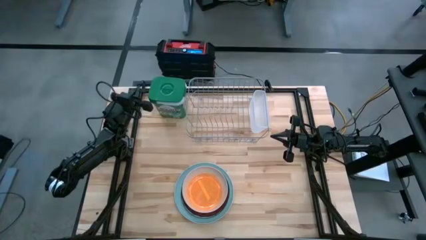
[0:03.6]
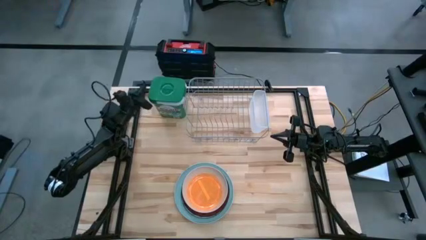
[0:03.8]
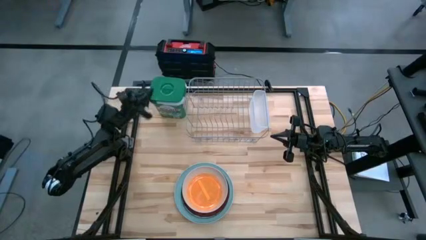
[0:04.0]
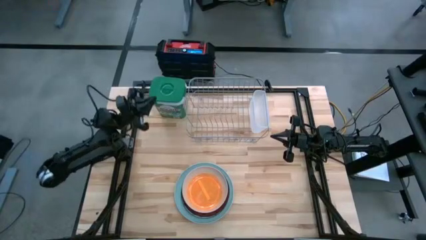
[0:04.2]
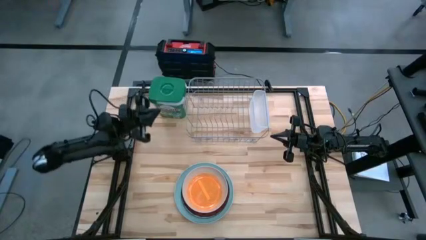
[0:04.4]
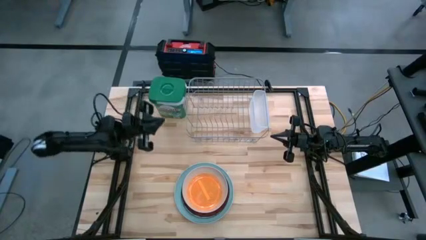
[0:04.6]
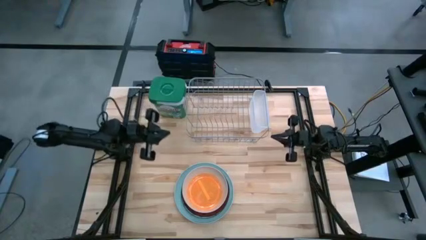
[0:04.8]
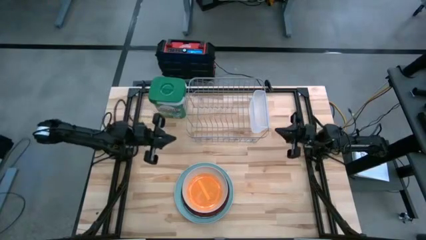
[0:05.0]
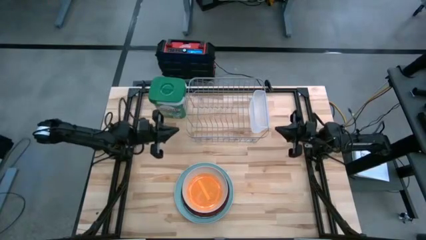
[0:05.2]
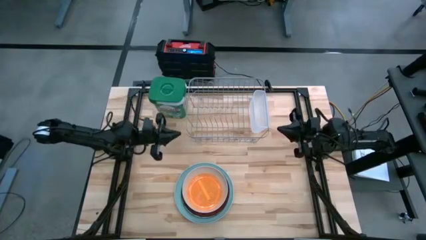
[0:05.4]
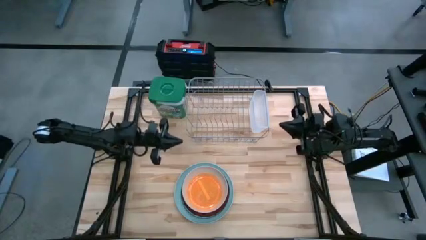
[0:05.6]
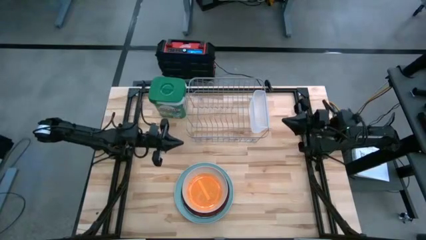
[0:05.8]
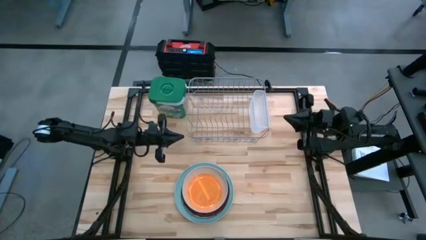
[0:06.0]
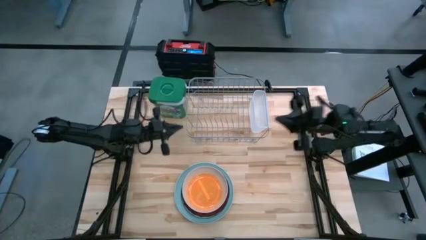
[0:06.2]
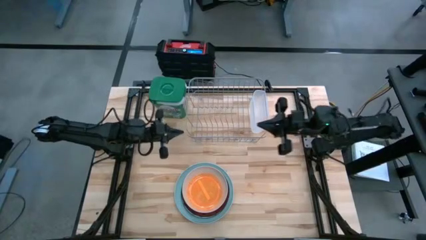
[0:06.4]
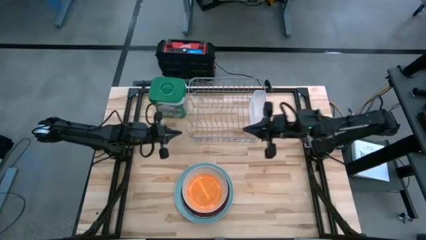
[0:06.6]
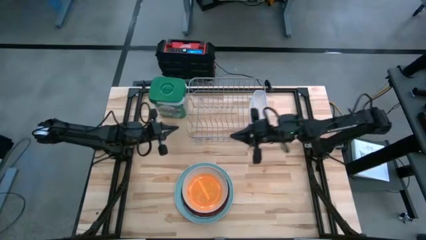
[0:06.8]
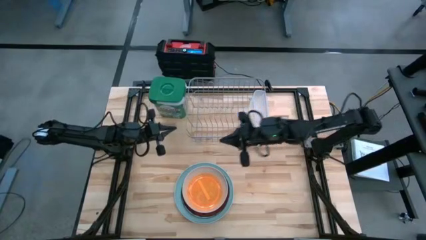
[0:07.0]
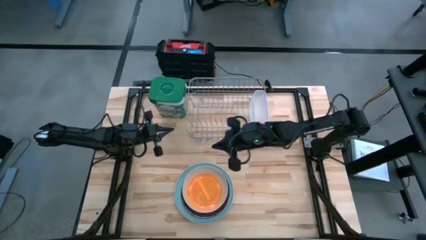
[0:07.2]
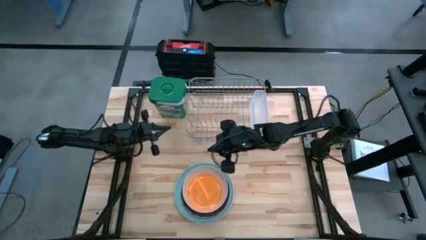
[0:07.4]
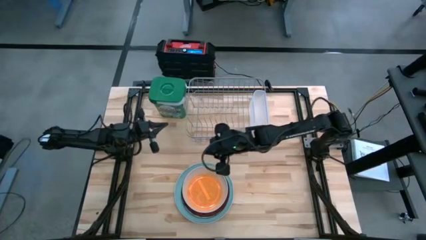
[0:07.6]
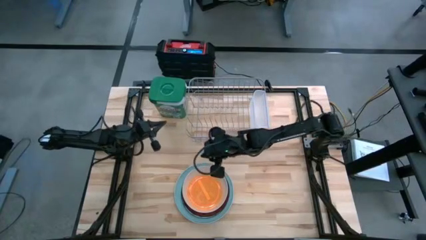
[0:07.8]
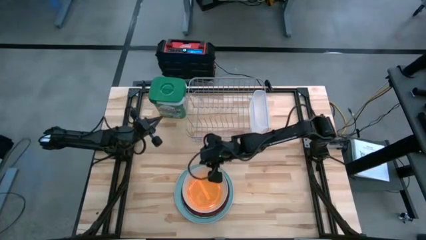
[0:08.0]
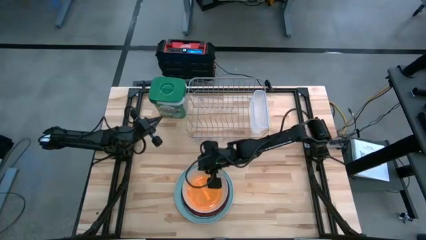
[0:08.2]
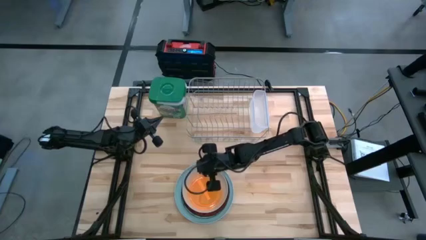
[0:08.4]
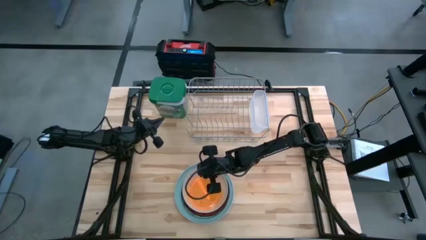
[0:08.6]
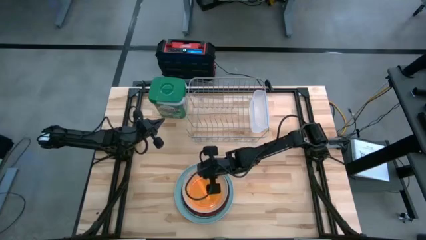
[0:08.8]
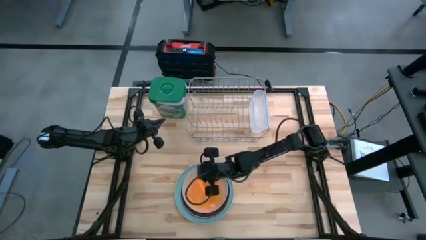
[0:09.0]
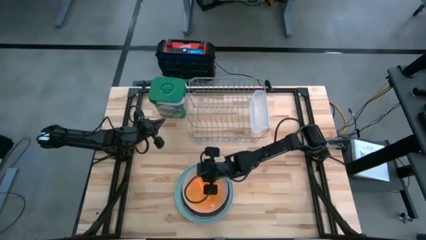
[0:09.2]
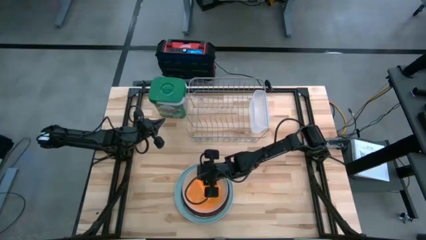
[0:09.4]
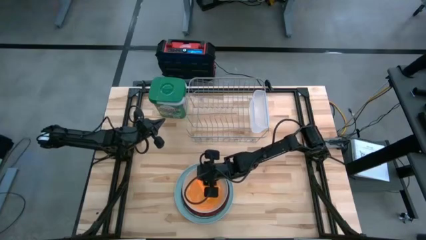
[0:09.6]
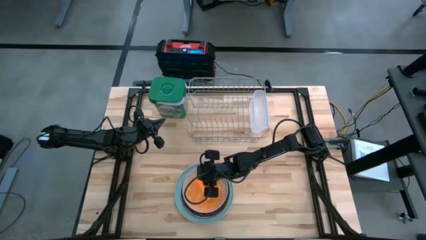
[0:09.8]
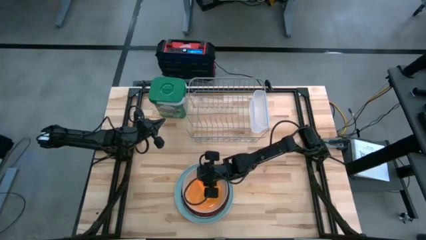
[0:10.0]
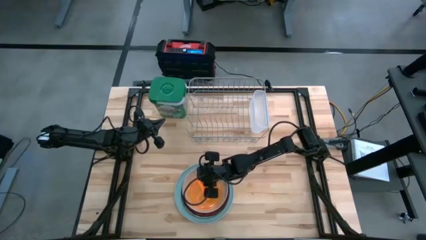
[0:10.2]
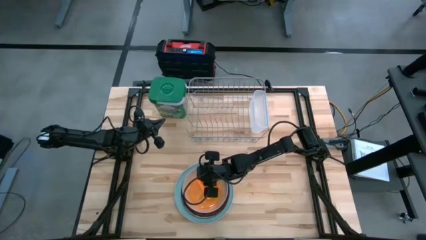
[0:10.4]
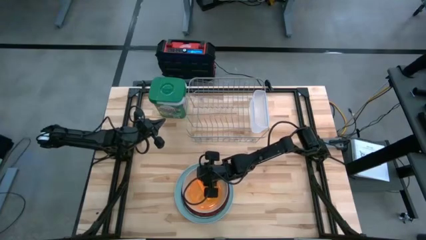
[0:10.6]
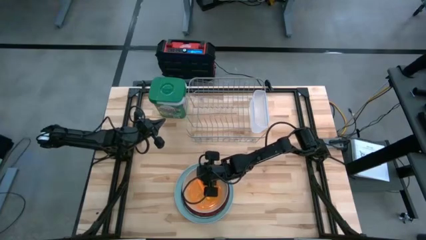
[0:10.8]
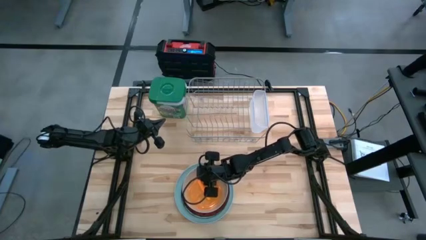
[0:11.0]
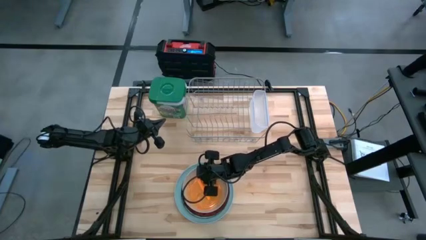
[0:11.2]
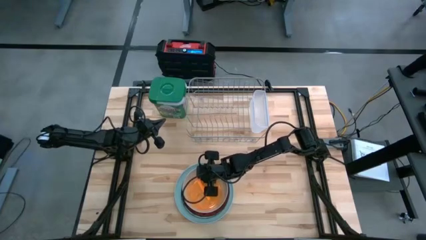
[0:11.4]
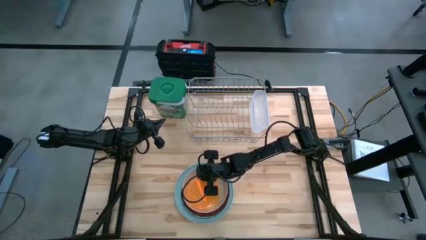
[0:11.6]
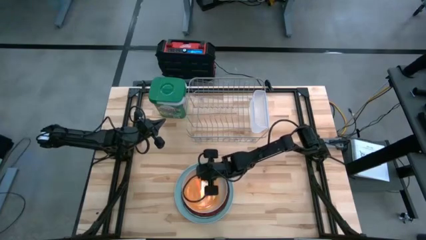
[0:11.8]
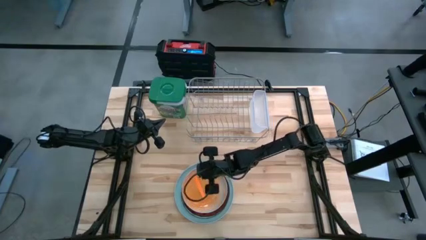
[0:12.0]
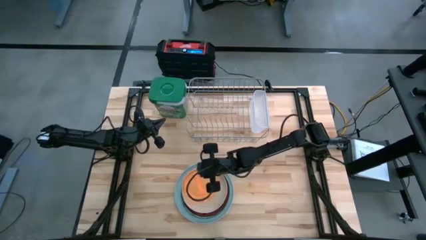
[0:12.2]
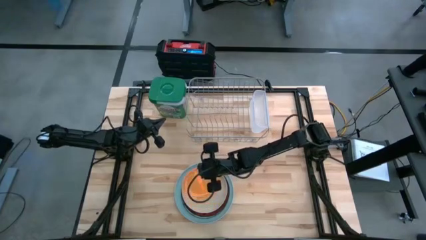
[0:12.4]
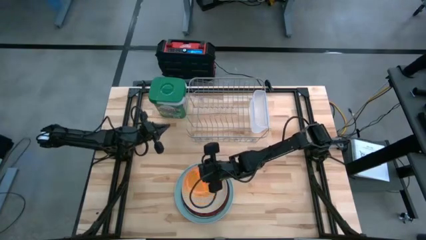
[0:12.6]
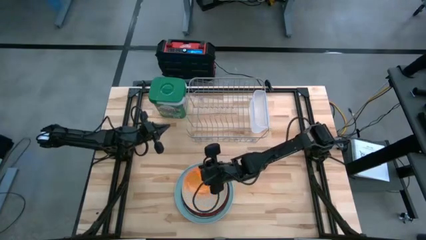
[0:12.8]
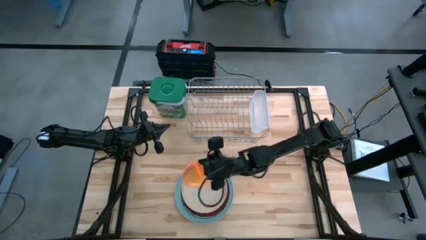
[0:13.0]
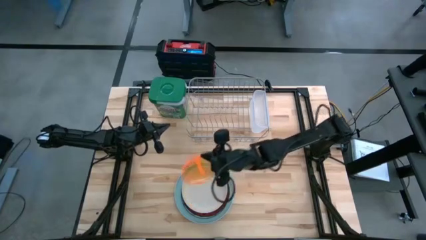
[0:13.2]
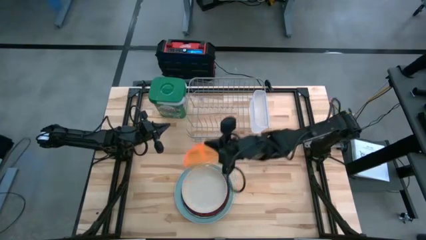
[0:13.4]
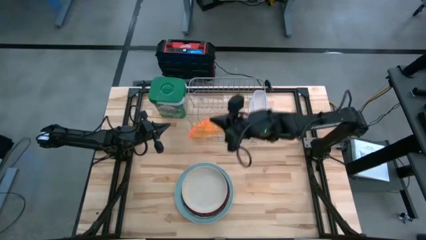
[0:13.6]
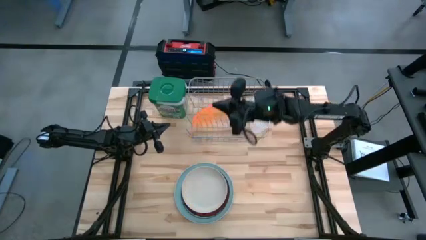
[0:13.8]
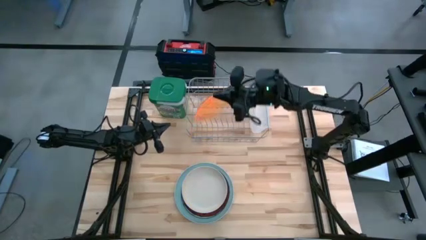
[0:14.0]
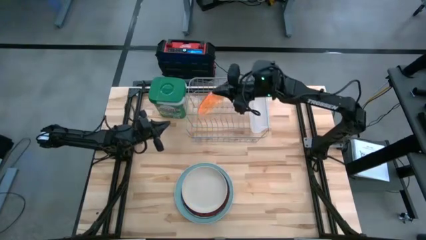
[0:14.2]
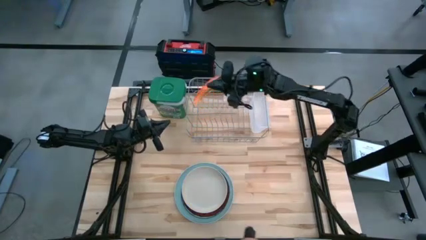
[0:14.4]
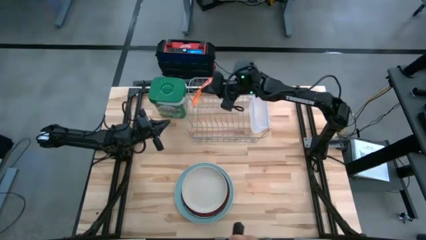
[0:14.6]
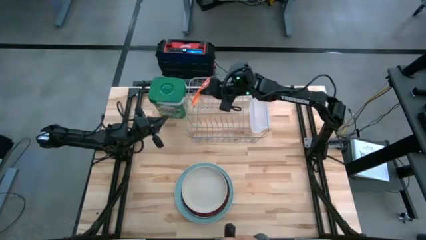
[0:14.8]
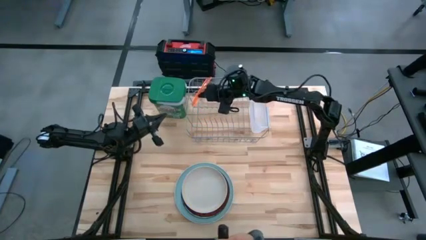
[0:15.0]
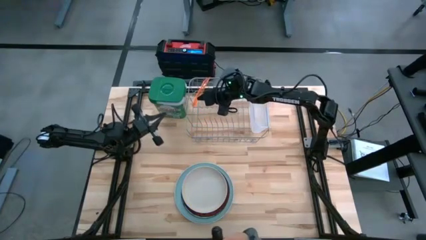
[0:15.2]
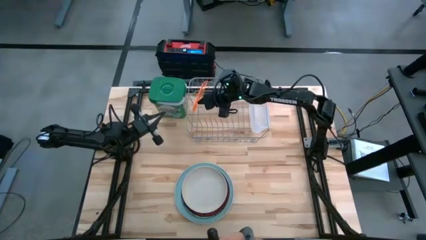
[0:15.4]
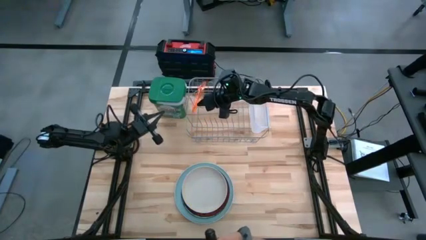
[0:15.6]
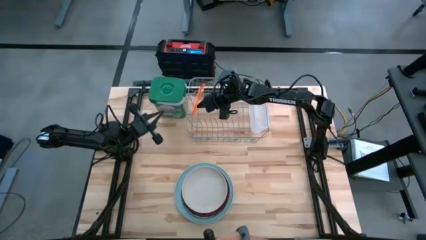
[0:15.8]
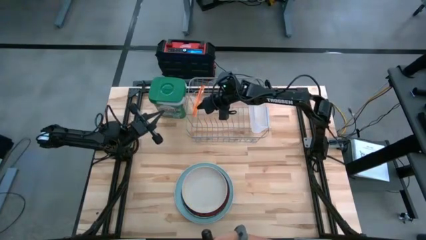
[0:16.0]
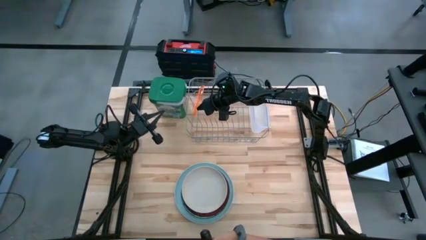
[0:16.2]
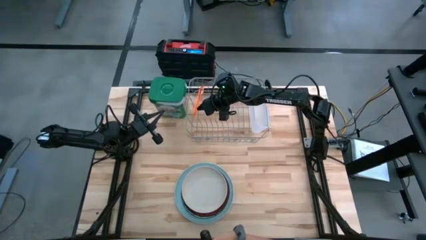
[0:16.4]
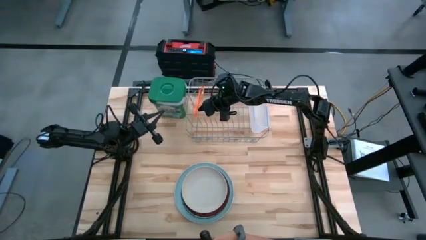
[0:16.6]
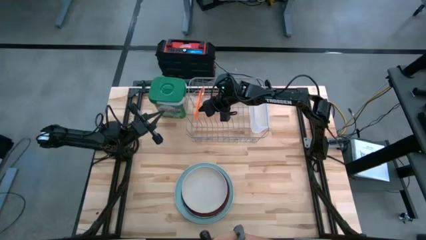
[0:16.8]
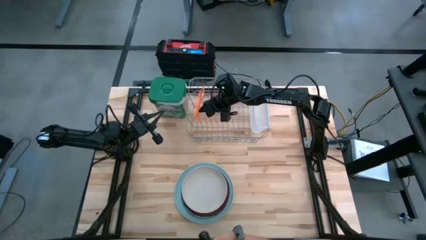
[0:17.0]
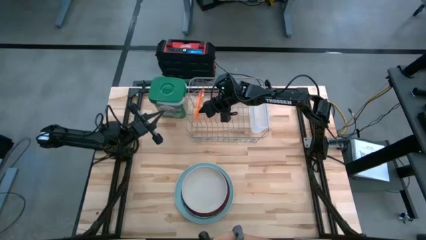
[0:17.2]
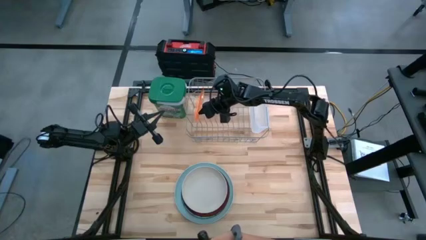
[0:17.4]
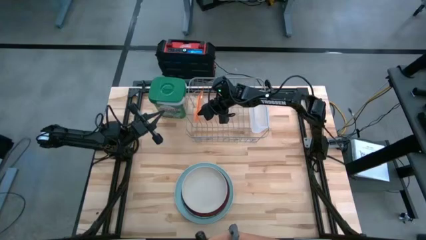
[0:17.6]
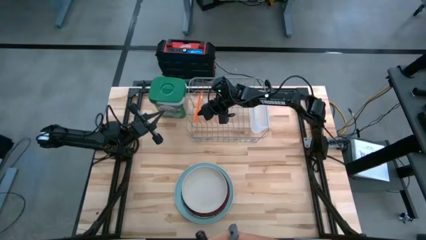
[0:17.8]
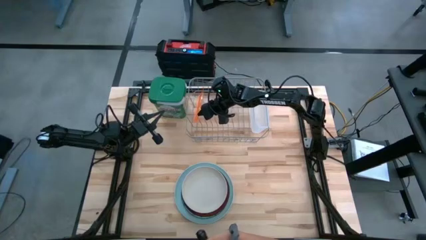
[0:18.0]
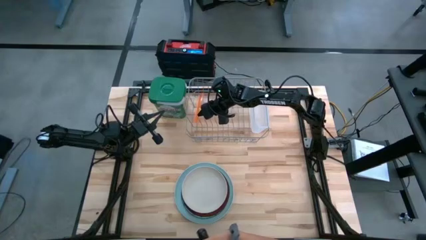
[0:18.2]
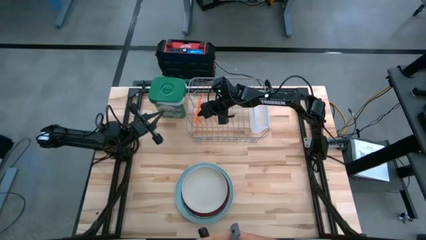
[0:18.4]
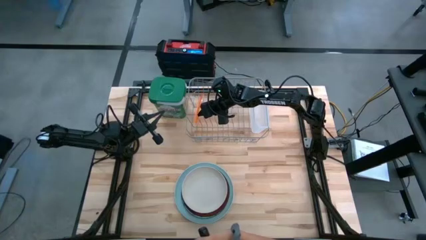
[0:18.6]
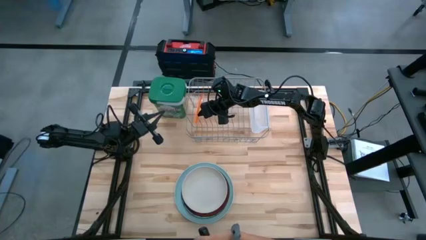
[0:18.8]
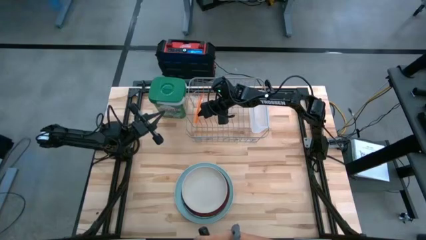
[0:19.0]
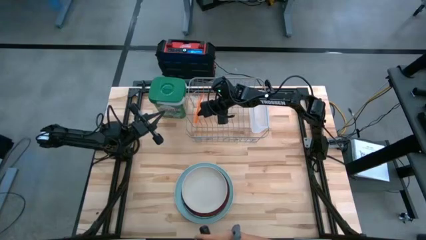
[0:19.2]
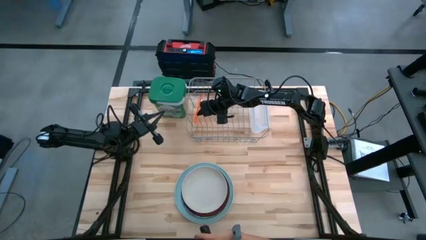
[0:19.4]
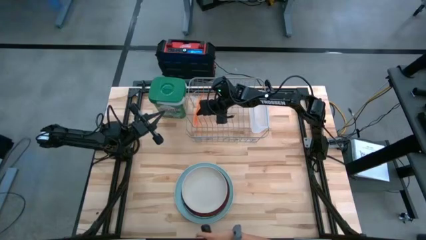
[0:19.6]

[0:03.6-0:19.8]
Task: Sort dishes
Put the orange plate in the dishwasher rack
